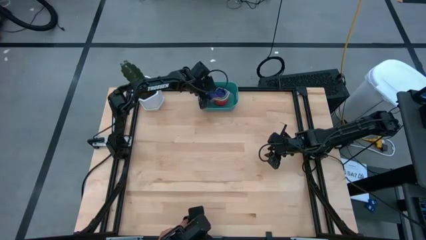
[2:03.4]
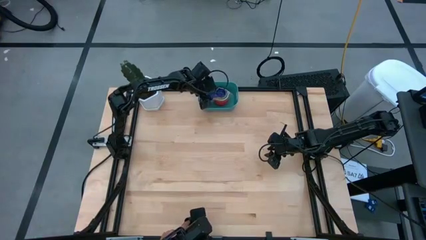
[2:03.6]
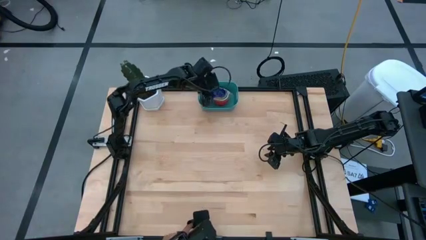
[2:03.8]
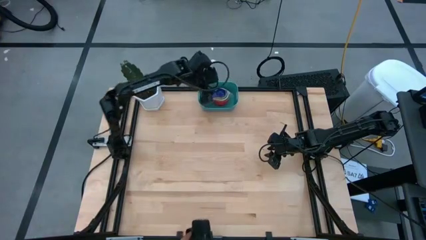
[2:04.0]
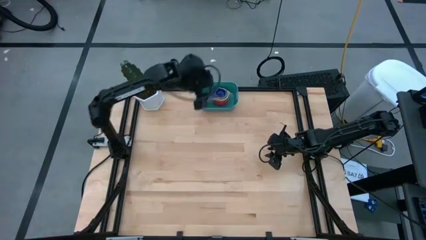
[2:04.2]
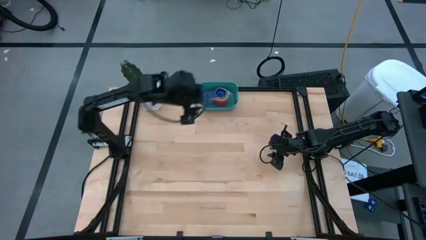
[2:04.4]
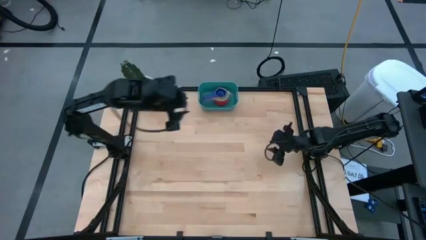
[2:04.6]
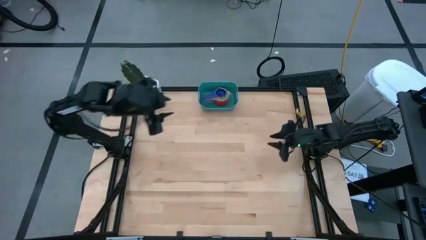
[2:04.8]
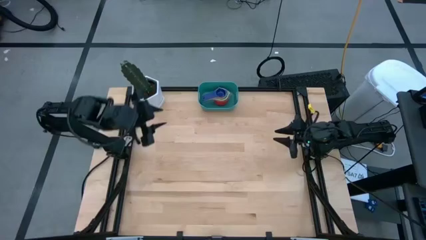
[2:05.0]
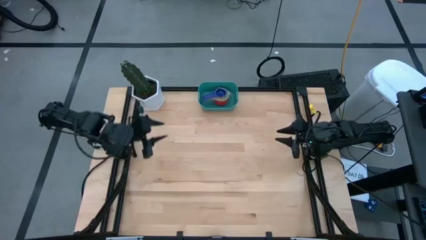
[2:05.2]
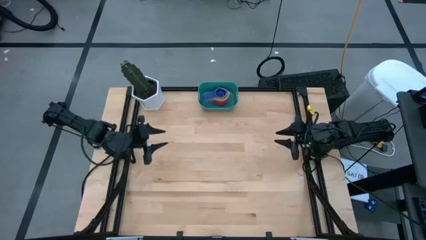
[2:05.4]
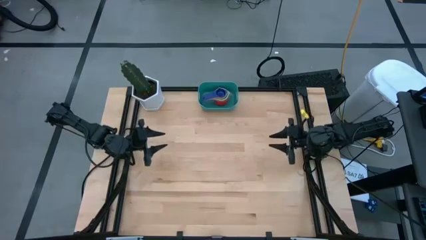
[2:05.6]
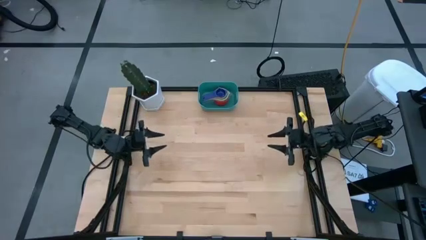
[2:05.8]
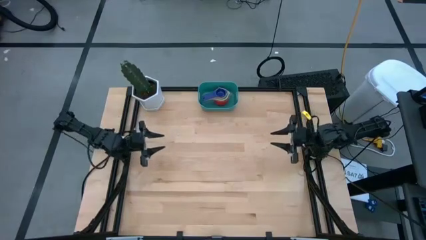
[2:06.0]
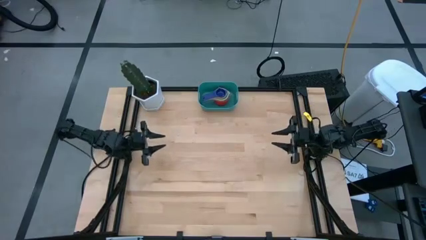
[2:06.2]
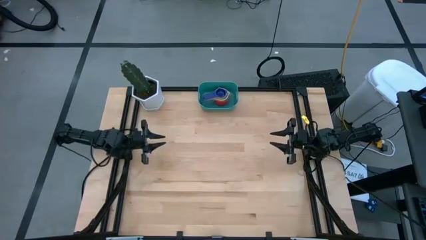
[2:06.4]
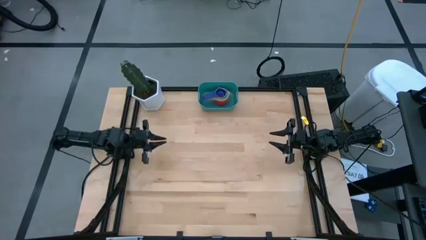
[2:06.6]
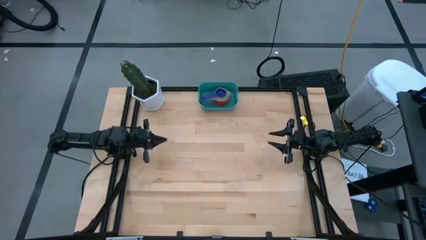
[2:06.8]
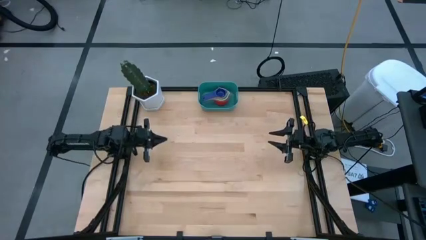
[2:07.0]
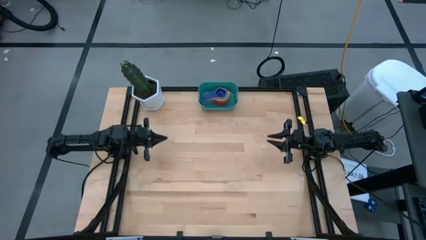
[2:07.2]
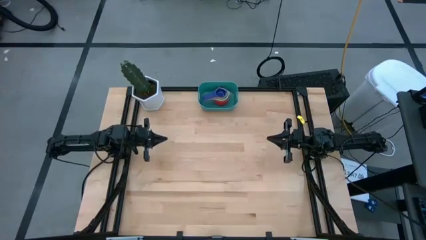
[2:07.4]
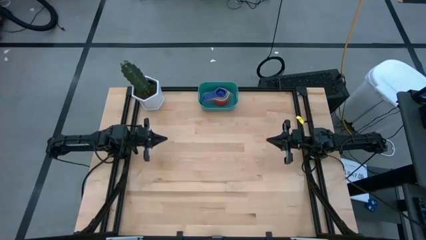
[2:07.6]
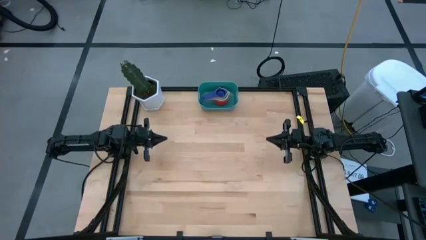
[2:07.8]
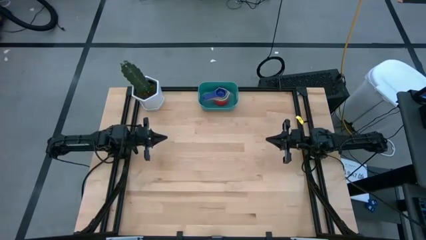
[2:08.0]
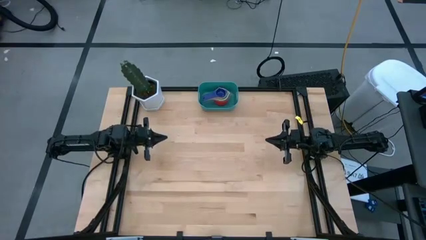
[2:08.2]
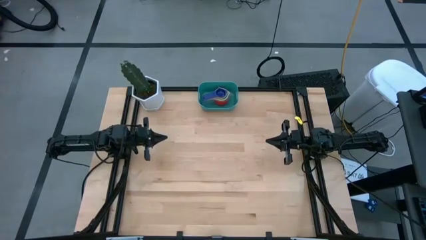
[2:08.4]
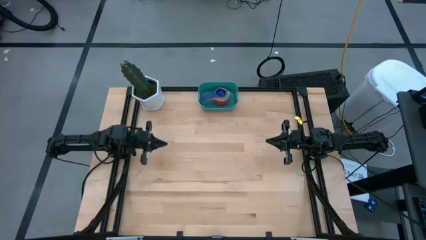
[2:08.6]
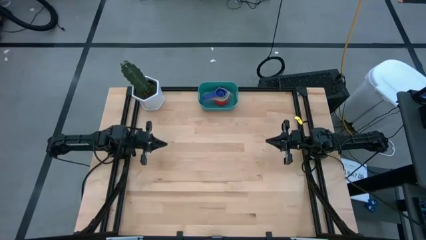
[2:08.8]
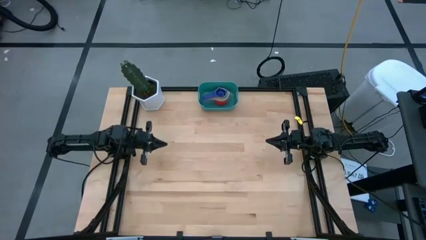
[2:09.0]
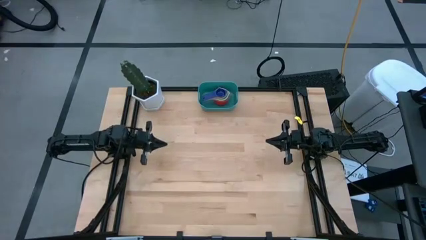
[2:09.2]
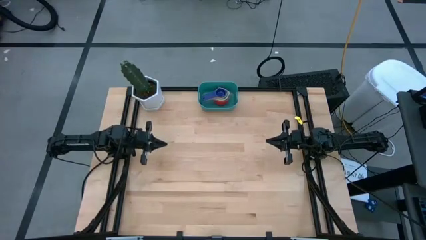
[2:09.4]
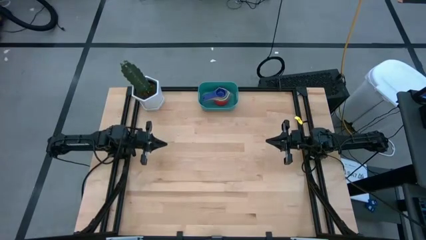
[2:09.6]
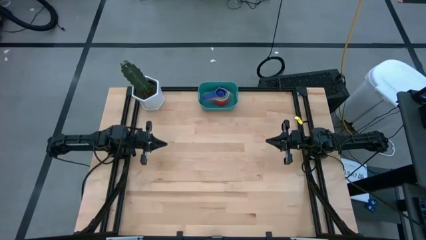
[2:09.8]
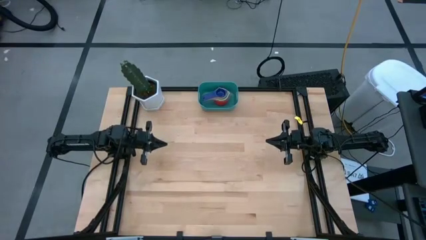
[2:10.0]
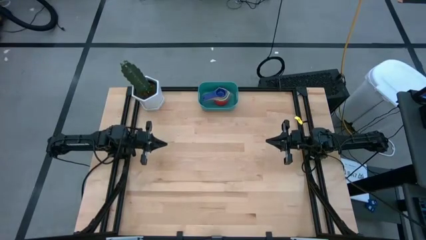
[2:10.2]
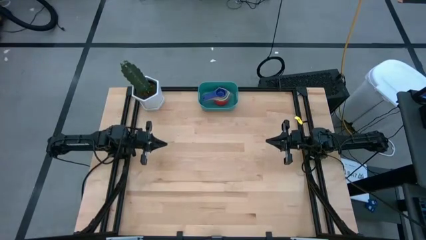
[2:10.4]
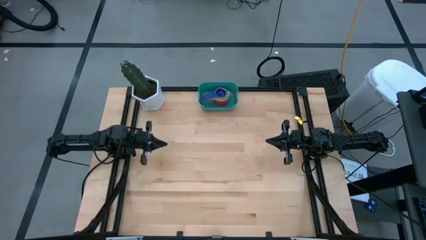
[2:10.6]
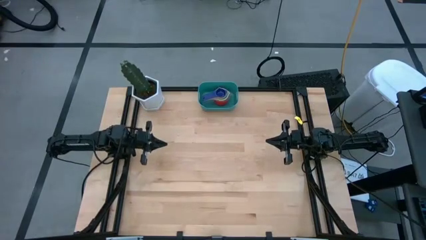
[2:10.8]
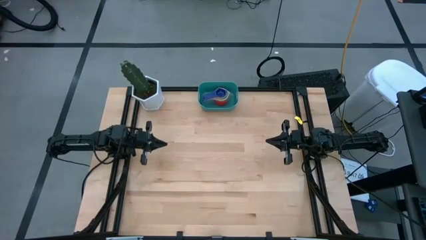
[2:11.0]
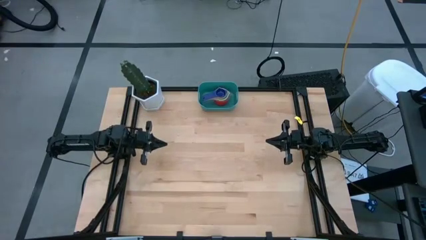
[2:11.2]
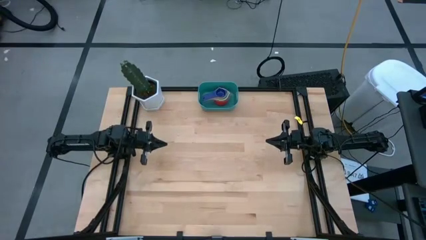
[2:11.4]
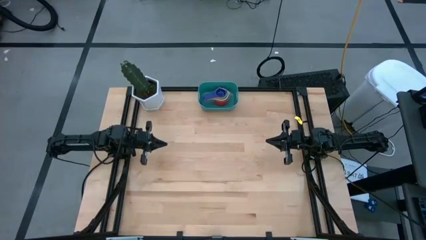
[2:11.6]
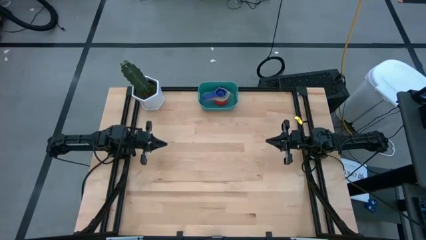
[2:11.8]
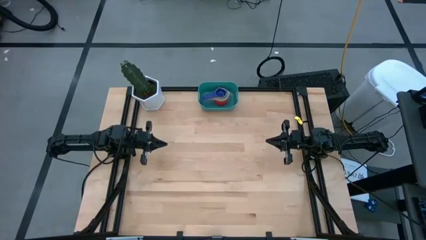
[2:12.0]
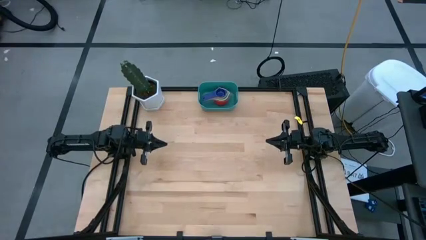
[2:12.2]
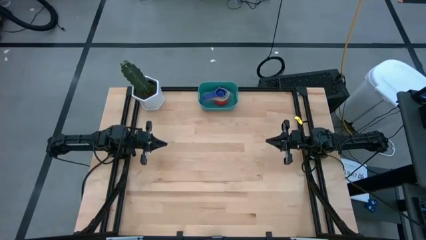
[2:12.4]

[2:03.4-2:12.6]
Task: Nest measuring cups in basket
Return to Home Position

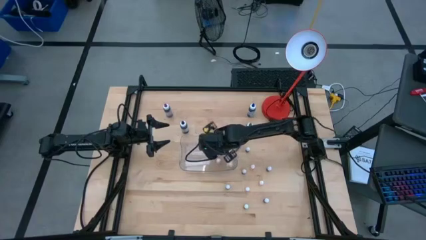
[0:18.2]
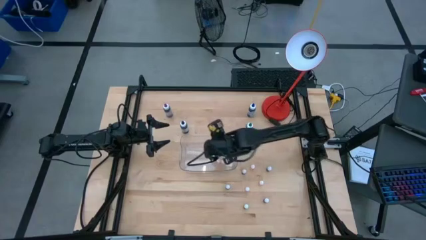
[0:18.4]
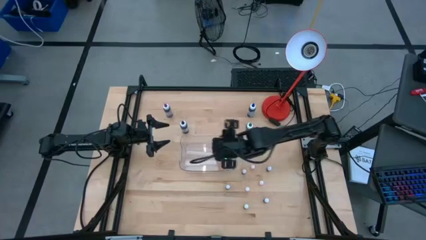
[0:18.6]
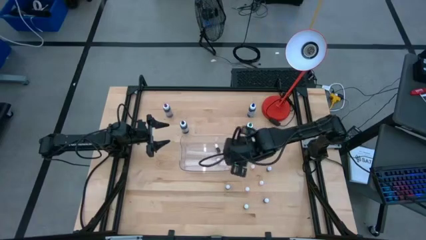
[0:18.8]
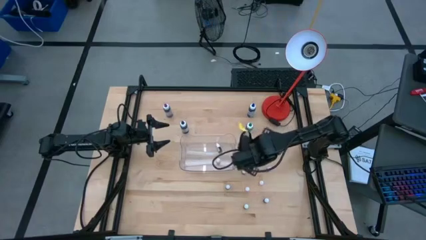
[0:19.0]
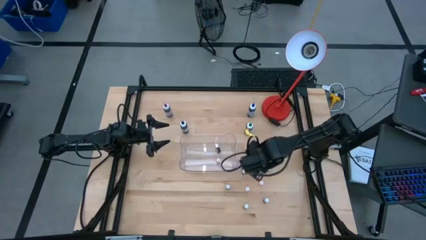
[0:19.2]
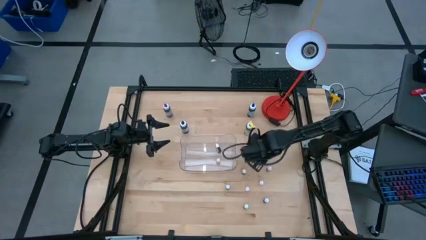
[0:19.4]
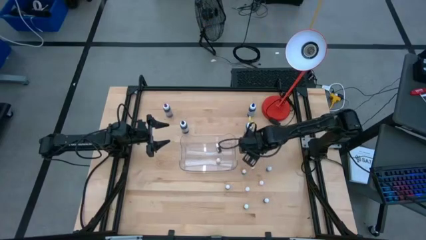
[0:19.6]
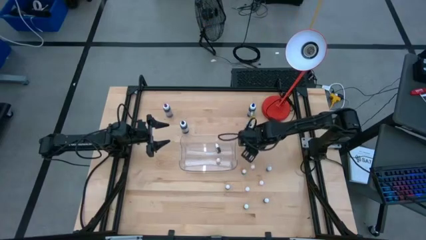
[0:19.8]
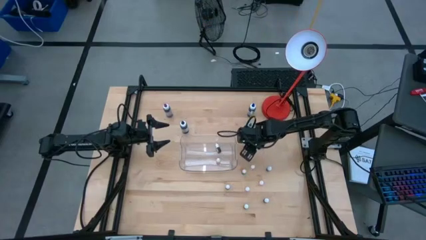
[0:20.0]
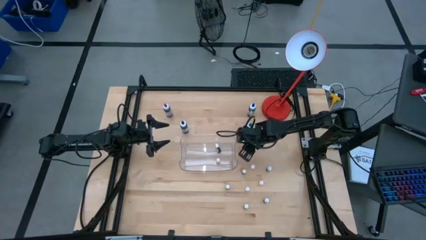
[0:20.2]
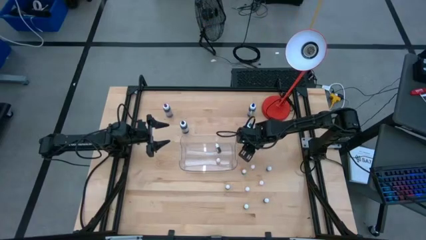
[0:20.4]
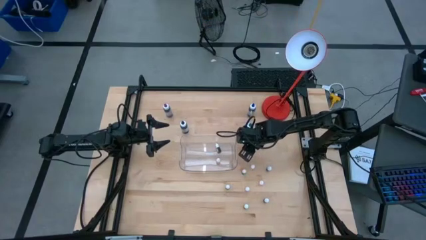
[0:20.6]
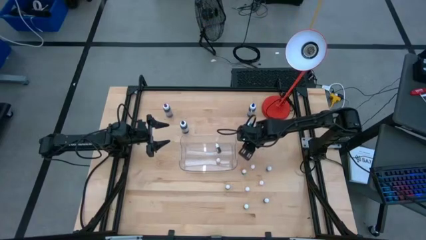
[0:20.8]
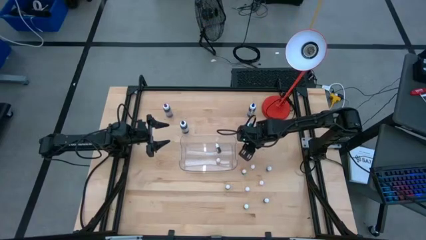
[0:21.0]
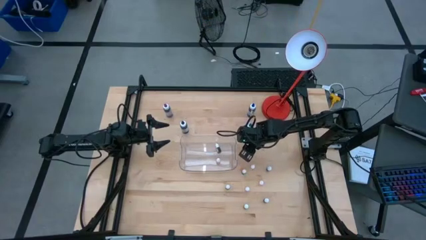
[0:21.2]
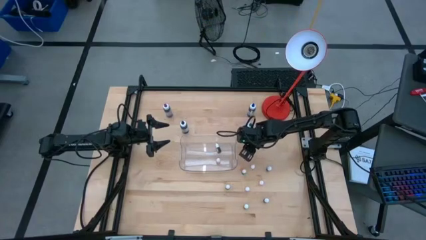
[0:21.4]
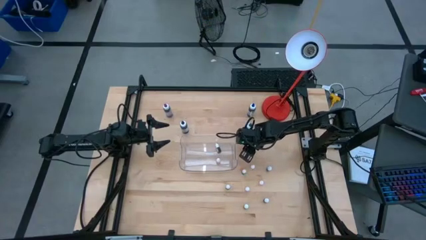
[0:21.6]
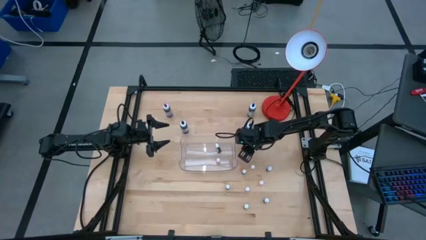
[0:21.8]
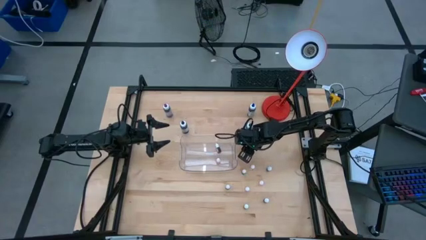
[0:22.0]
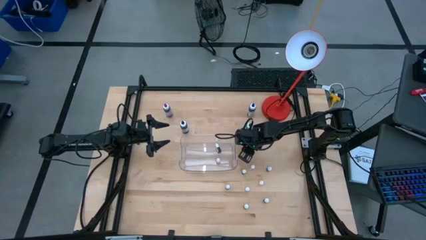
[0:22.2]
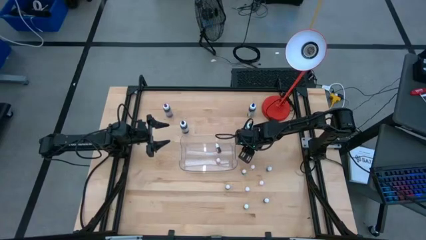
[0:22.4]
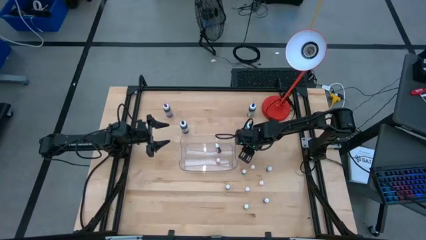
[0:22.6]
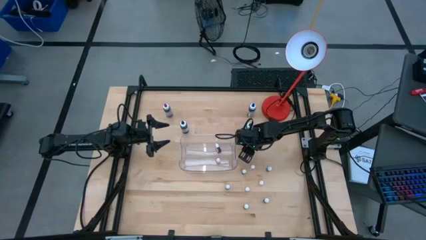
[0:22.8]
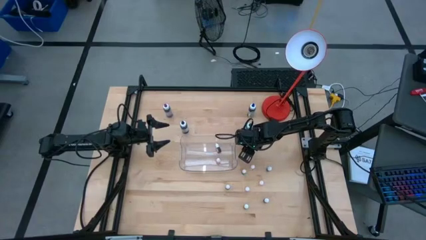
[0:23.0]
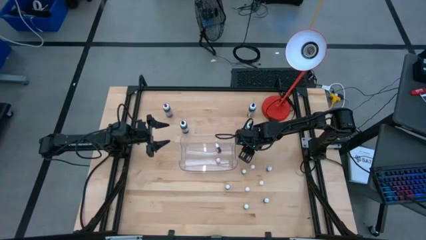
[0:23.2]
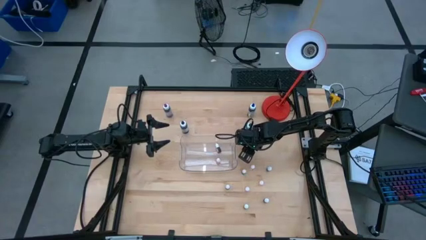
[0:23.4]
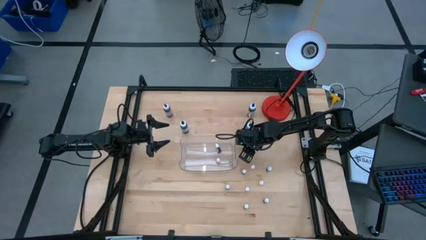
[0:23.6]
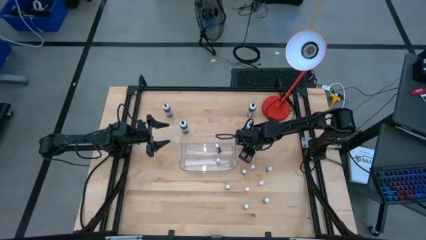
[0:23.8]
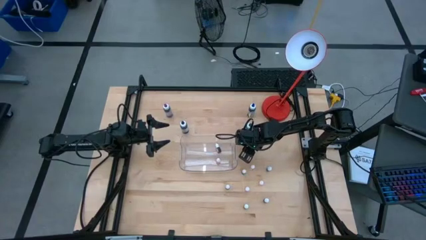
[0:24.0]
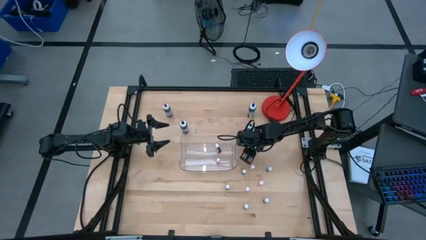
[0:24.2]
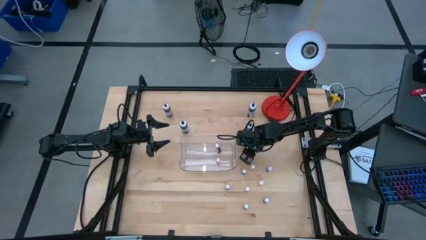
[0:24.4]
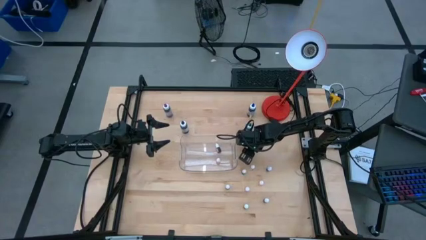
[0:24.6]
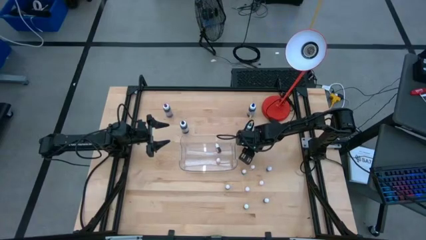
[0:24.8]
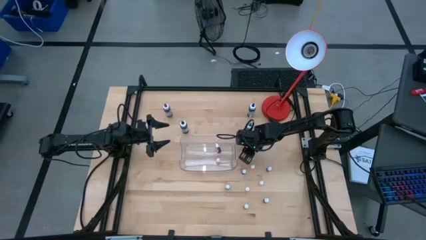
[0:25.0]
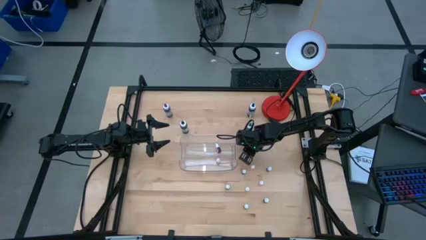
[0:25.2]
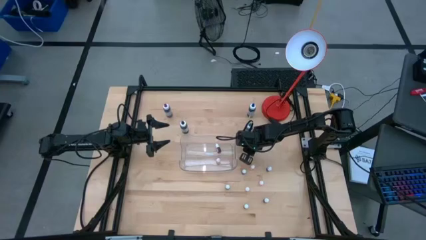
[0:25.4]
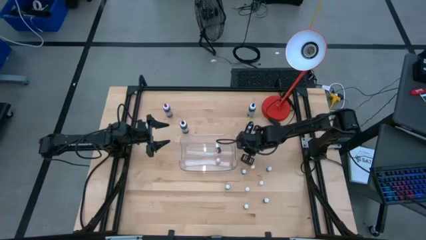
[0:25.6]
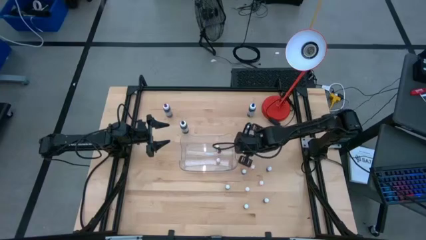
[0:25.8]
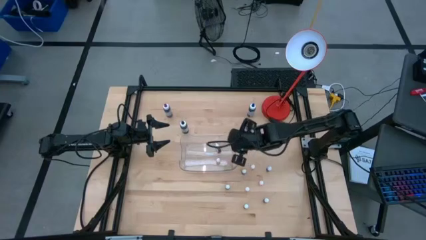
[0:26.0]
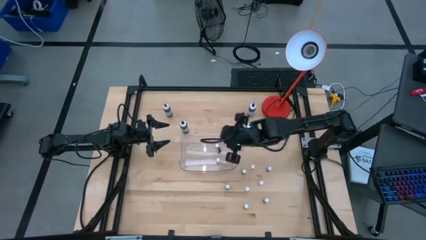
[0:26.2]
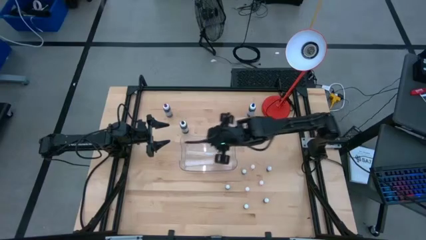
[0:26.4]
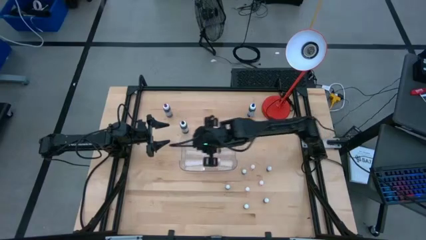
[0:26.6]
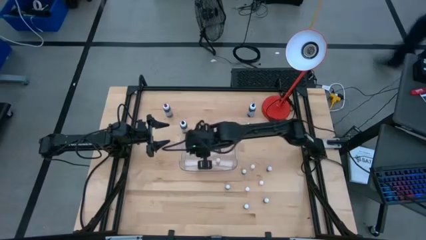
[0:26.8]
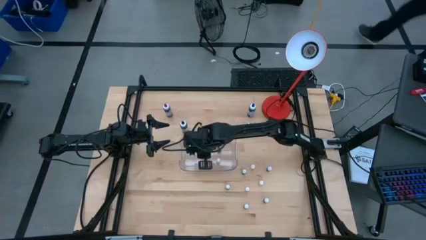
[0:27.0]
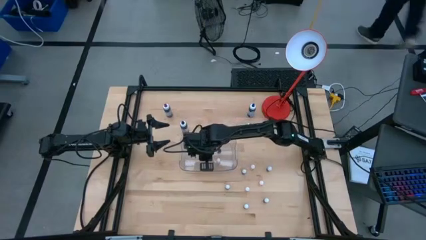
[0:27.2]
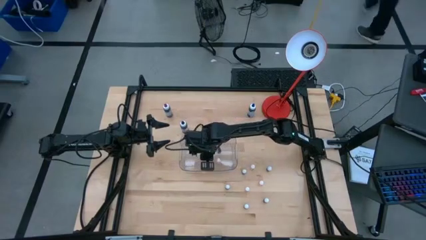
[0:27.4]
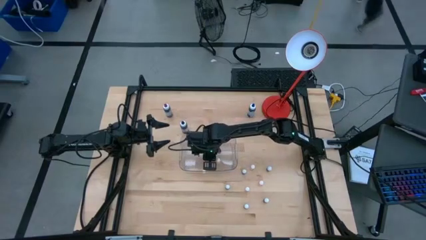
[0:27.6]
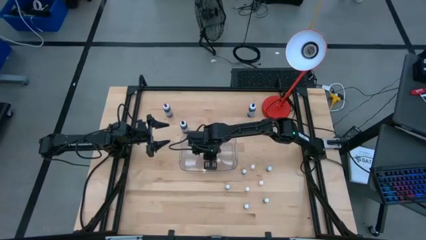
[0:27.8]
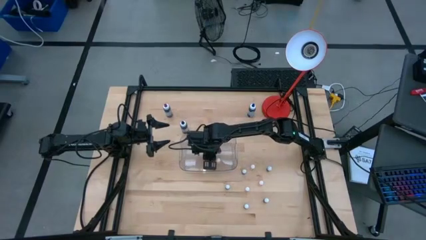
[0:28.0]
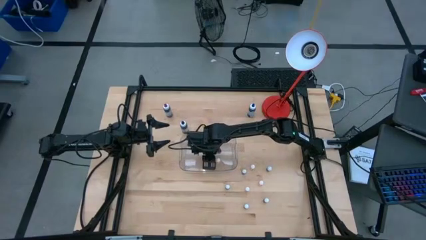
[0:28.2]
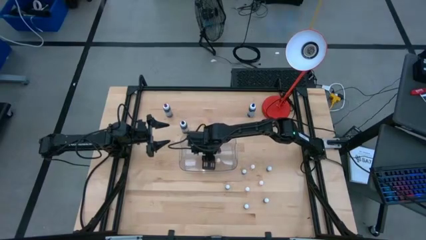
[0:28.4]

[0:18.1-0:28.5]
Task: Pick & Place food coloring
Put the red food coloring bottle into the transparent bin
